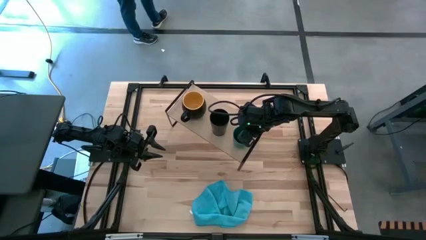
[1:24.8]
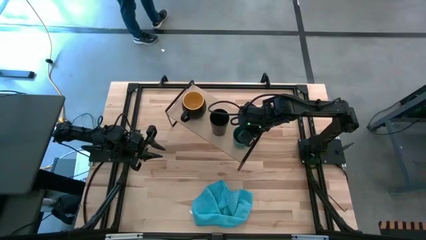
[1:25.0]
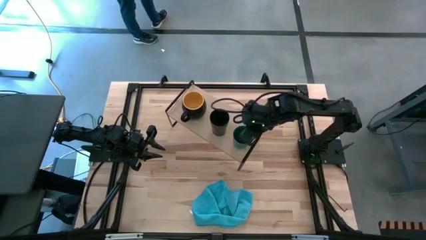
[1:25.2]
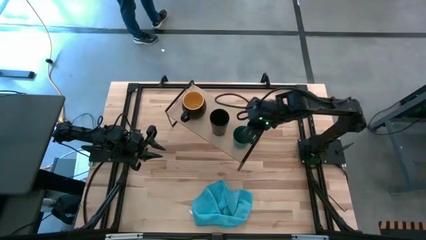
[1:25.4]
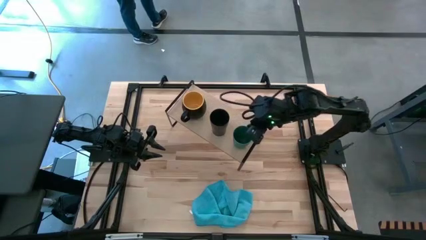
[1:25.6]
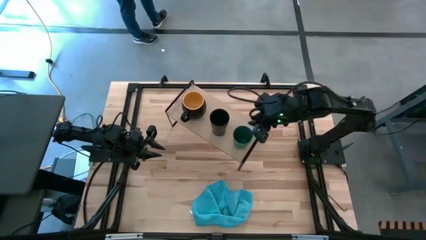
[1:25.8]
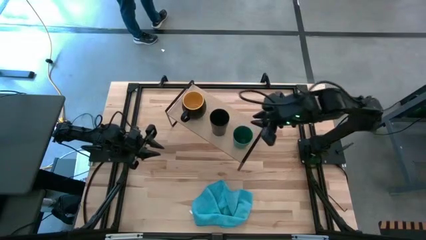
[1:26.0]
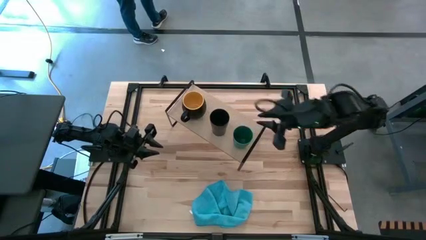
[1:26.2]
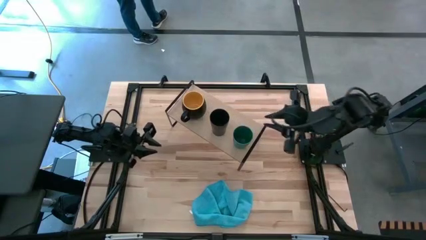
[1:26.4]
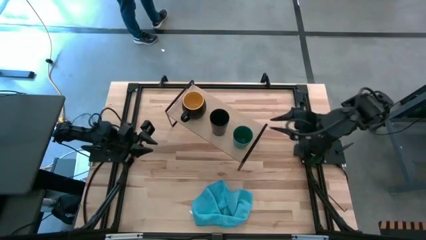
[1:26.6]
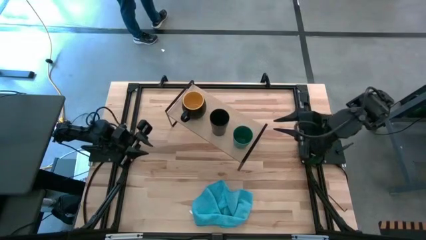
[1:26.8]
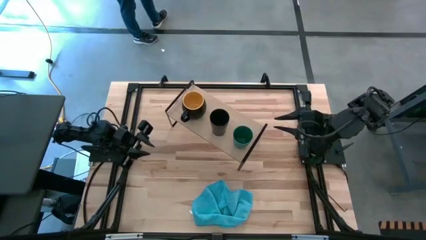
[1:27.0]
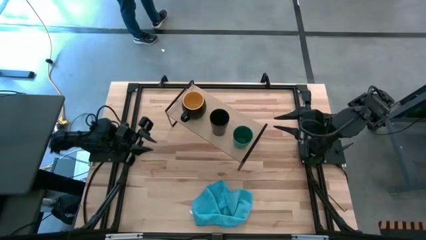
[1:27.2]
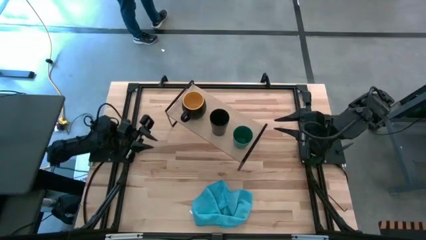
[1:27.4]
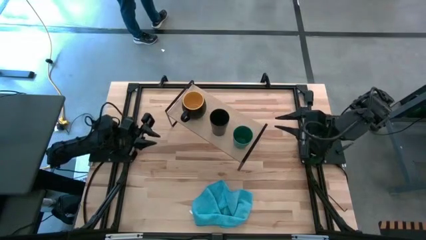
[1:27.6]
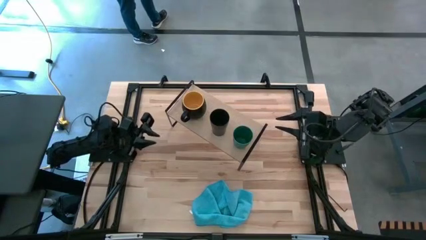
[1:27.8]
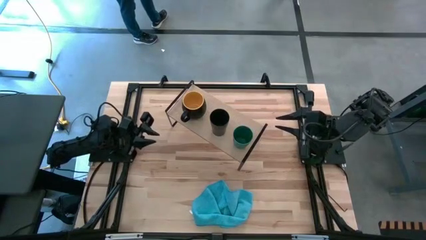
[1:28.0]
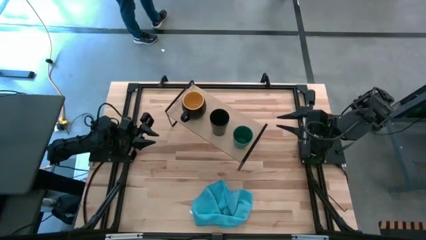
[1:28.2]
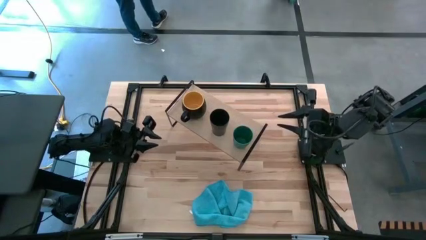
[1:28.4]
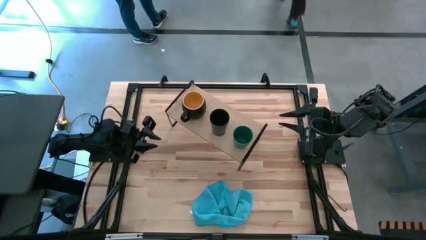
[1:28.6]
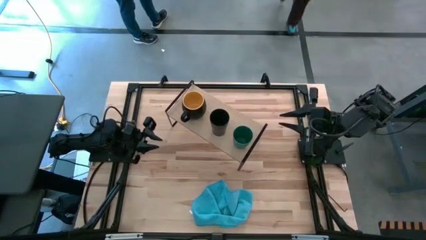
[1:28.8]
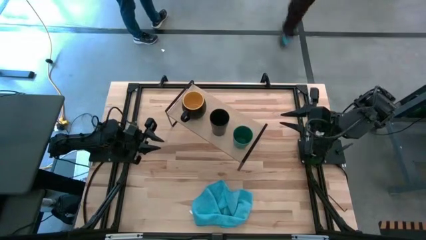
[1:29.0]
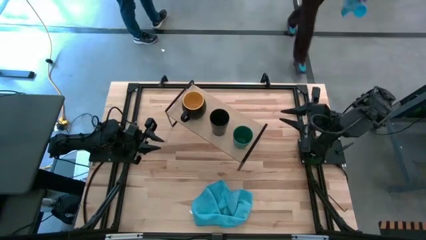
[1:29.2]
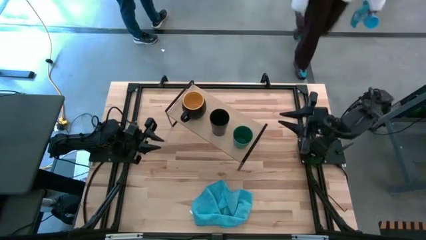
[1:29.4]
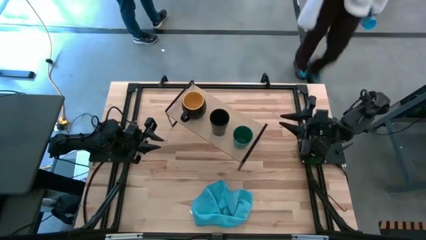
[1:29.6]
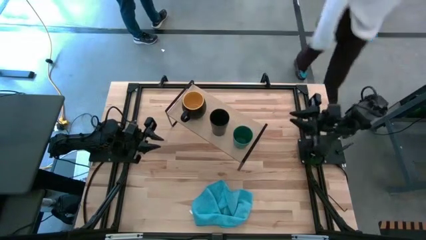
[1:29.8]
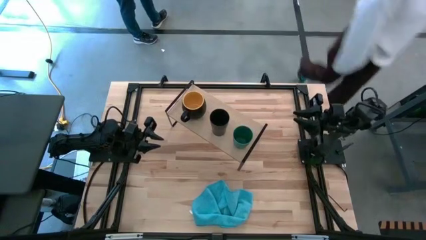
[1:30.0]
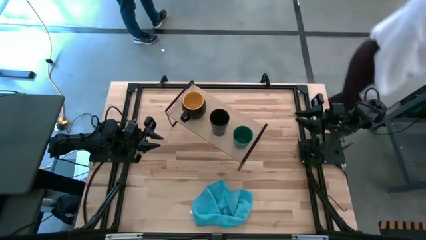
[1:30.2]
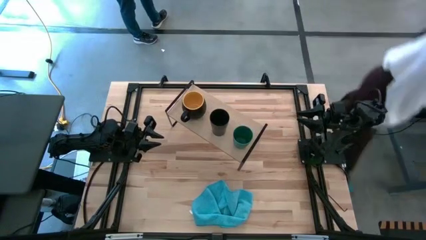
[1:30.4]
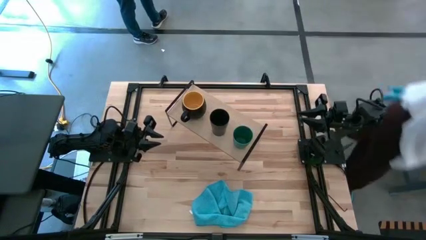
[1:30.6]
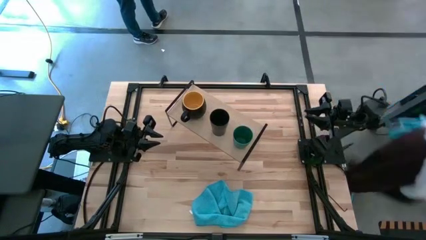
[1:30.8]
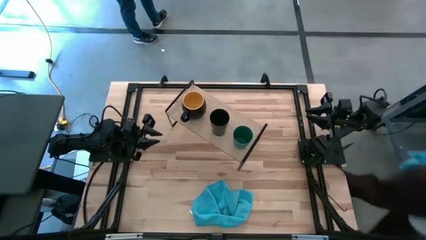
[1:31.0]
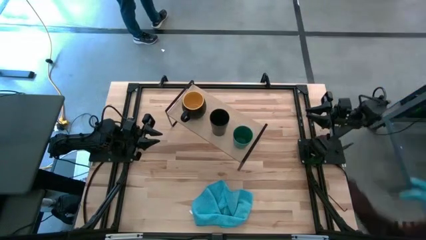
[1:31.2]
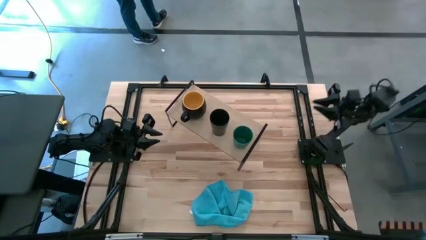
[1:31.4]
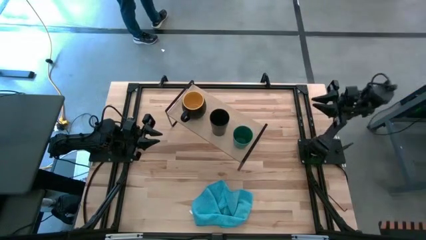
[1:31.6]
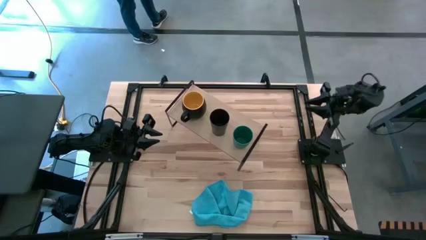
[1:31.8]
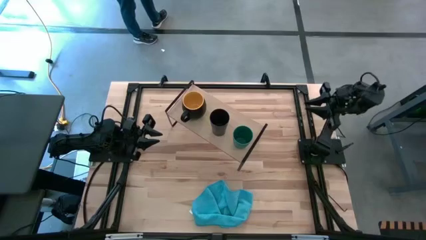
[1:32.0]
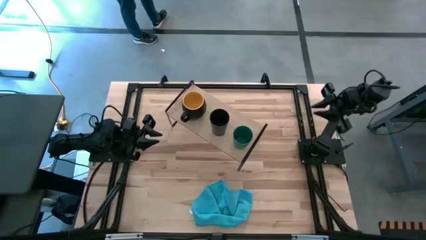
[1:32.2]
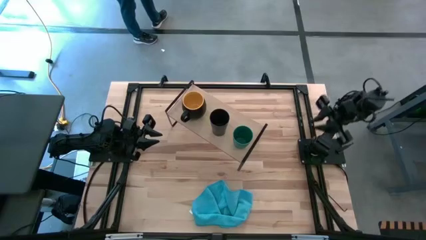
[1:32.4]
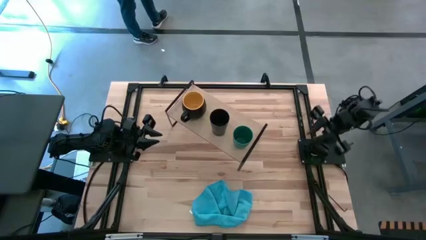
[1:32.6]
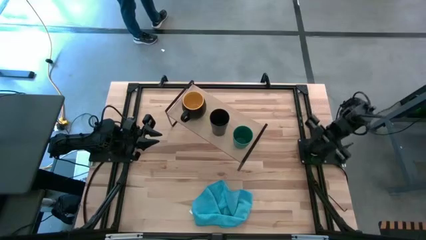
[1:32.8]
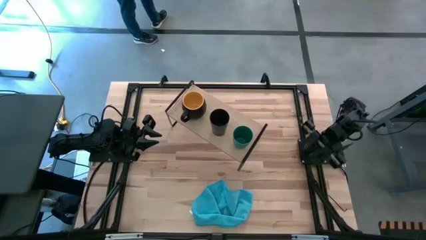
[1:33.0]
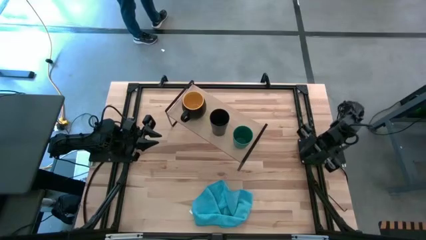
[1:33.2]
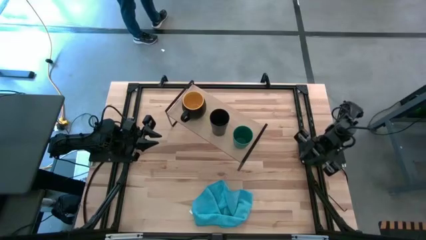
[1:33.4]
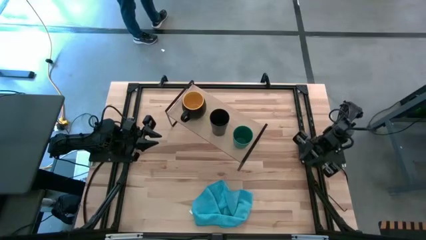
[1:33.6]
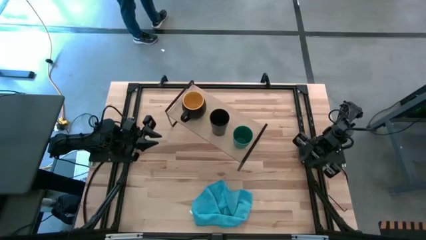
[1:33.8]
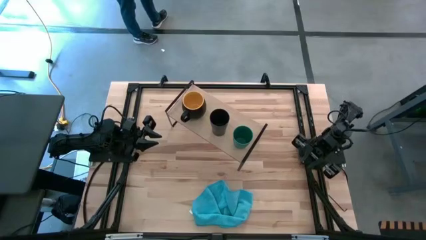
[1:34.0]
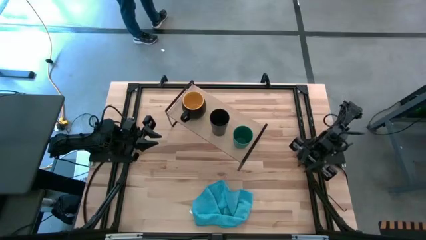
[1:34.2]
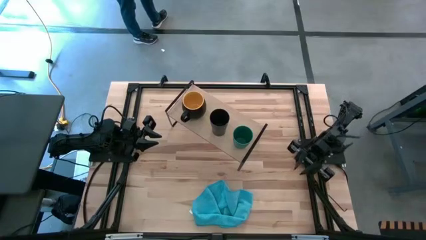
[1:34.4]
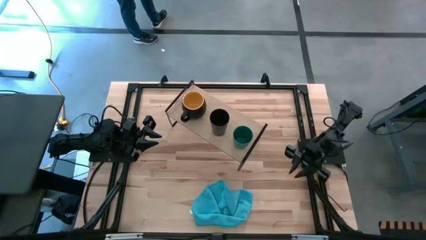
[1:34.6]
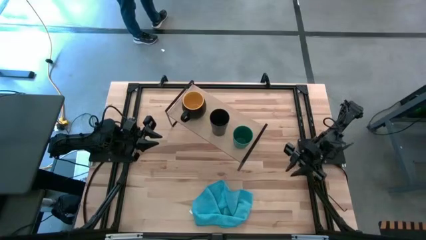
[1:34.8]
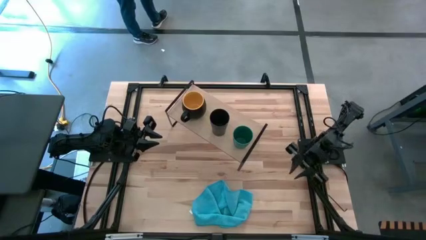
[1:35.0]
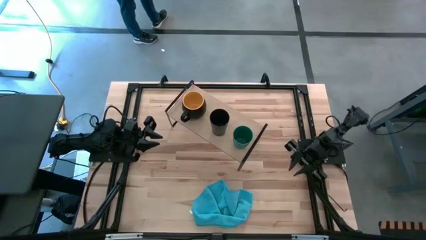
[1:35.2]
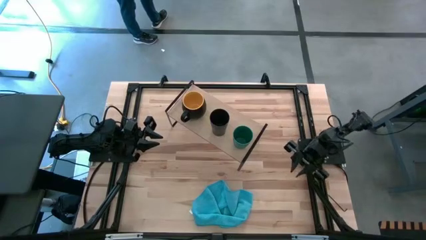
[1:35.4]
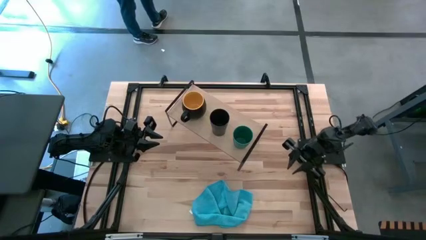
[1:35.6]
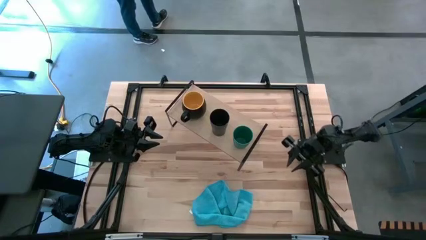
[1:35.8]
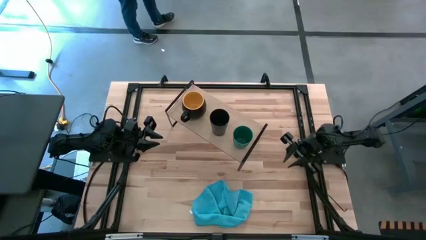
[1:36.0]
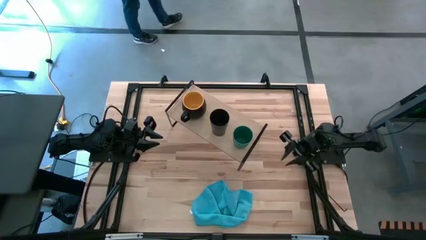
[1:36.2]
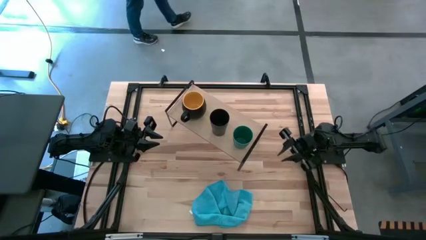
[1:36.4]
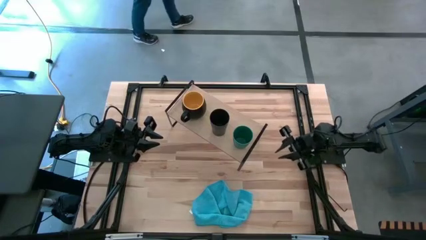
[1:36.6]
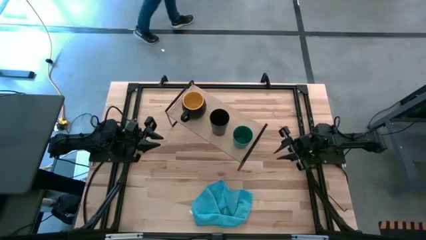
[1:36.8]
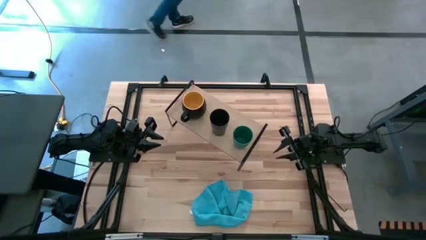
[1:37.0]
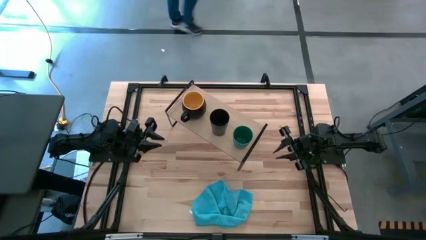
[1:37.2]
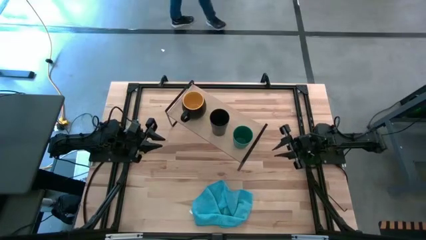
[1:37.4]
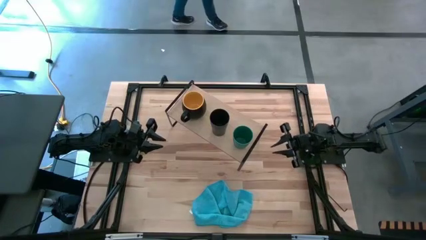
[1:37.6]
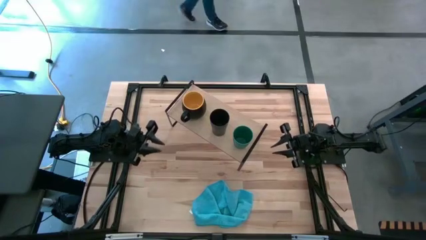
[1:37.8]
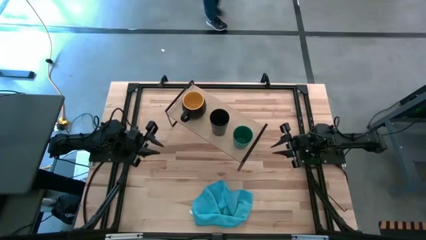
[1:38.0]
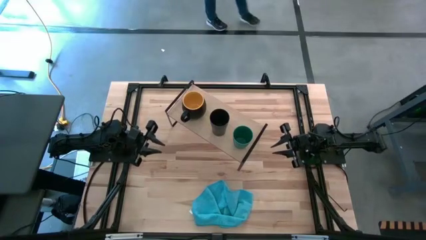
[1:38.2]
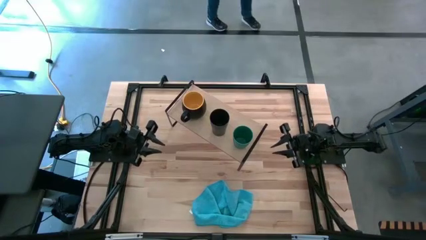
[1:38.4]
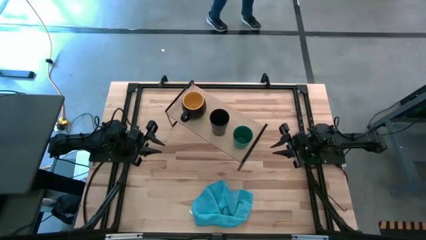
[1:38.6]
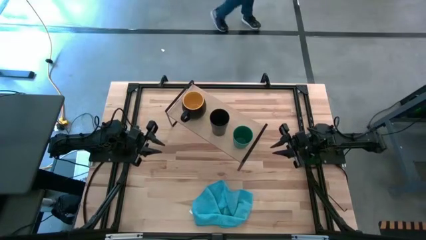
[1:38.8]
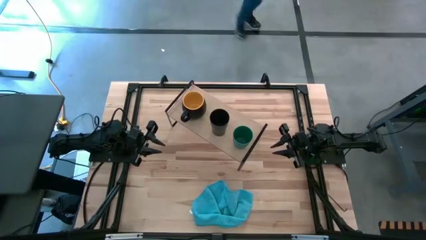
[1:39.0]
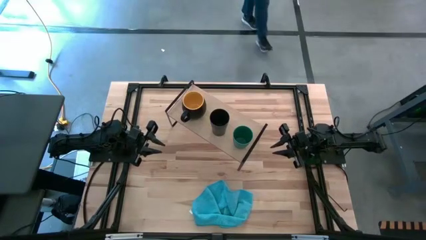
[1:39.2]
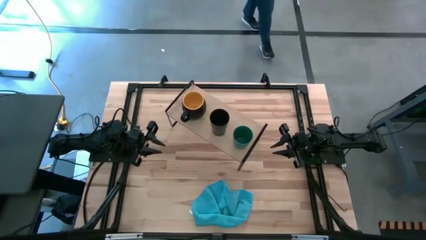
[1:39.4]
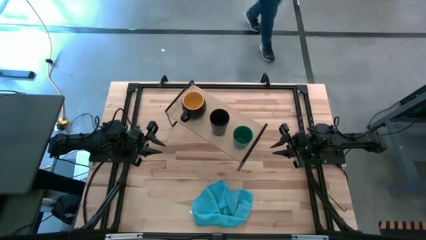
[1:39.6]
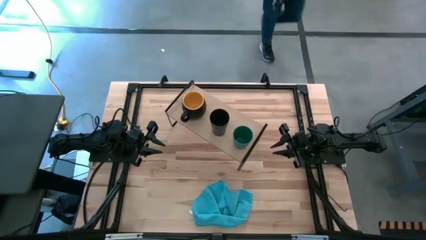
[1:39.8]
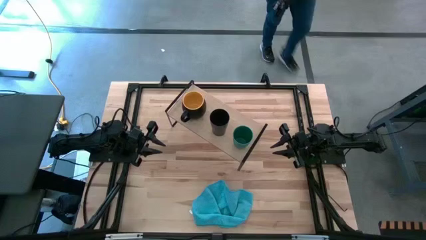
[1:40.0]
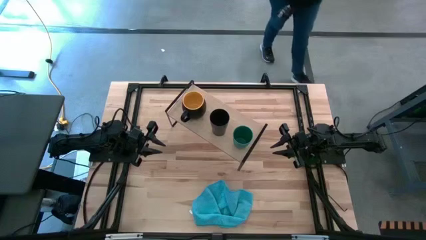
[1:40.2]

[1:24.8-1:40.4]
Task: Stack small to large cups/mugs on shelf
Return to home position

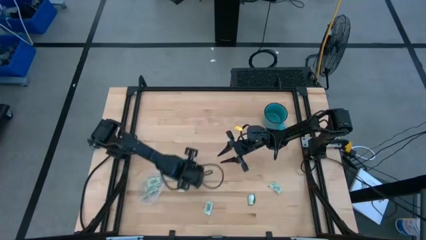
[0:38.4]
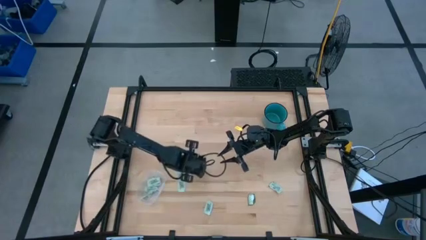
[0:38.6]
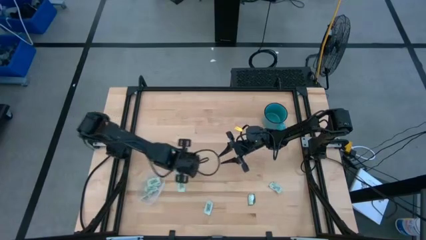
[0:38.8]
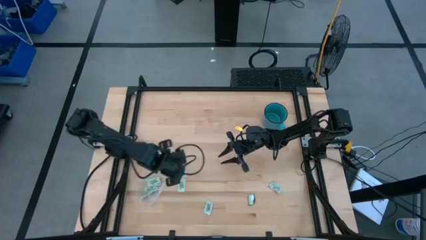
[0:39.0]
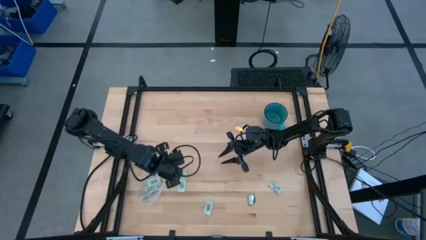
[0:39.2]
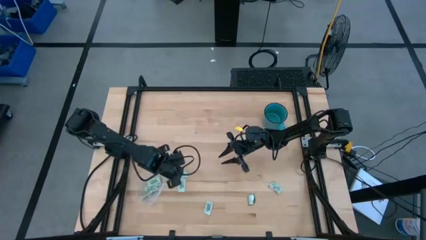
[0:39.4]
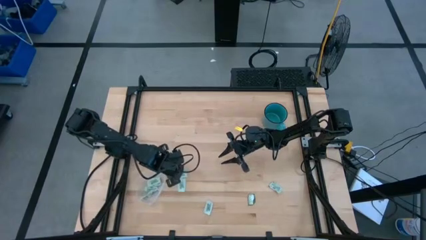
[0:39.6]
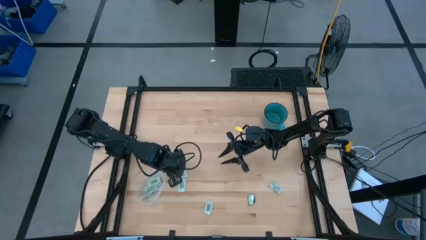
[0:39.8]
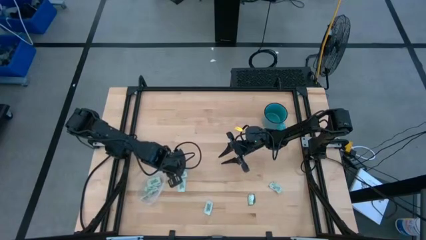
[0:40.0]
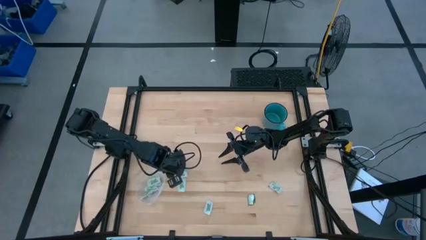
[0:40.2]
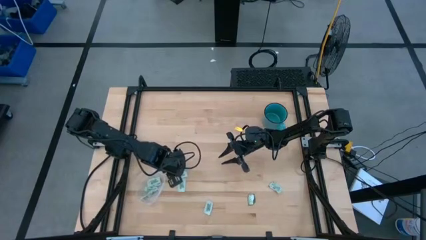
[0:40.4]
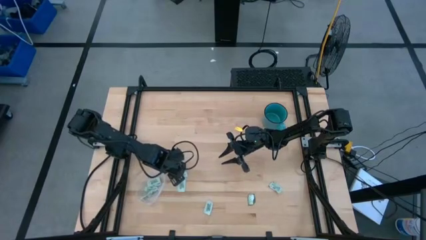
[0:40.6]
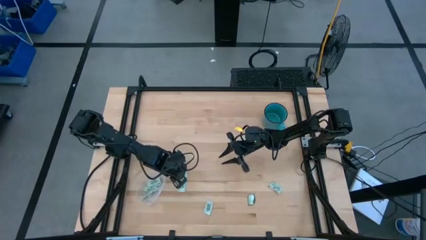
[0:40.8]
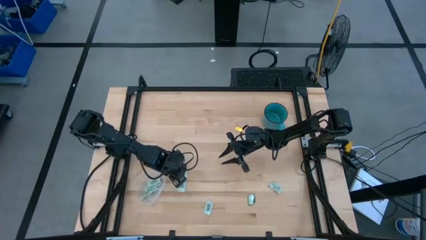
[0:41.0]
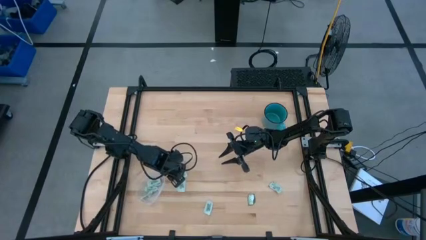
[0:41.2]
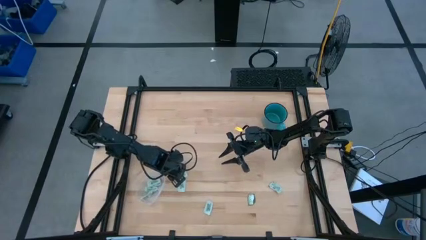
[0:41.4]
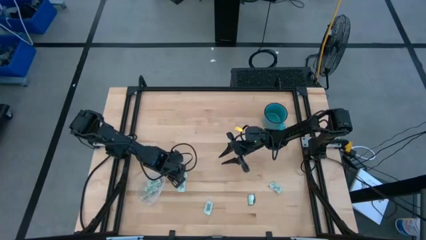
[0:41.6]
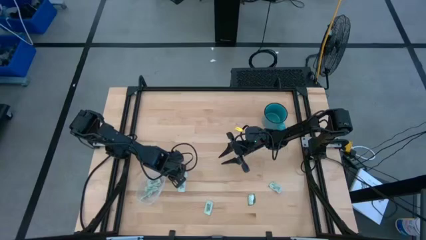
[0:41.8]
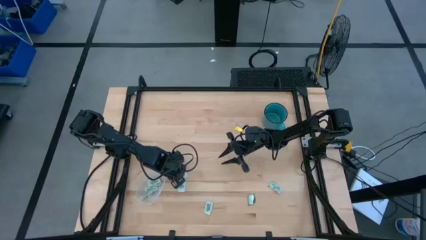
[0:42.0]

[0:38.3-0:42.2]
Task: Pick and place Stevia / Truvia into bins
Put the white stevia packet into the transparent bin
